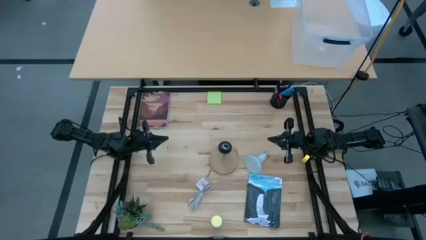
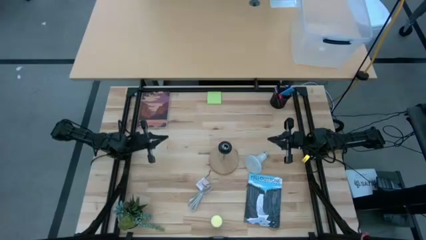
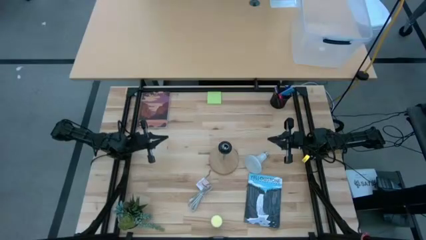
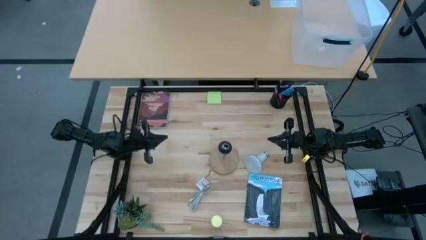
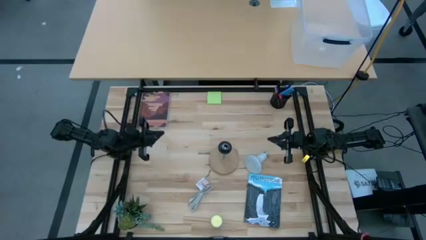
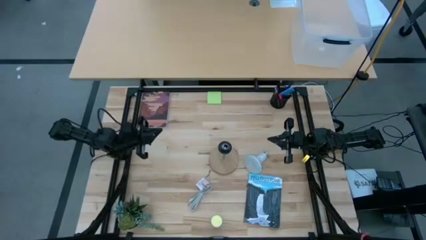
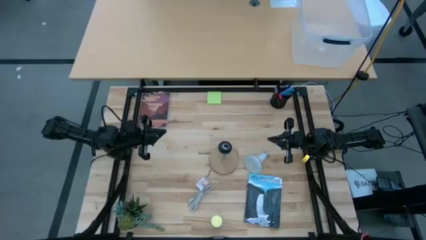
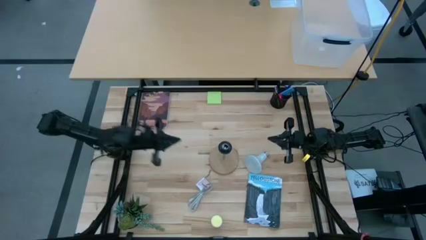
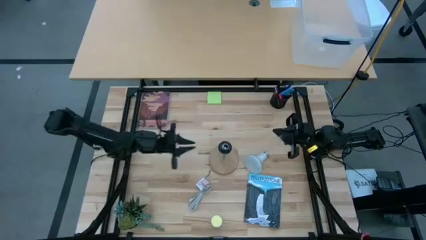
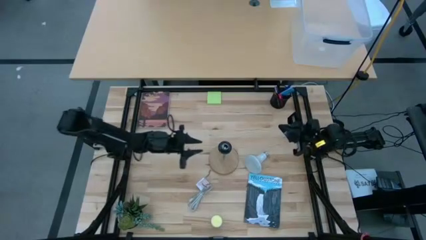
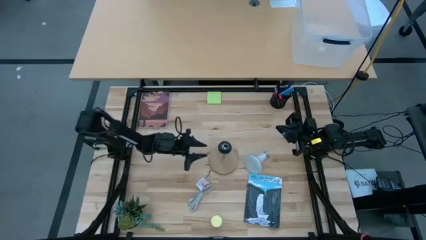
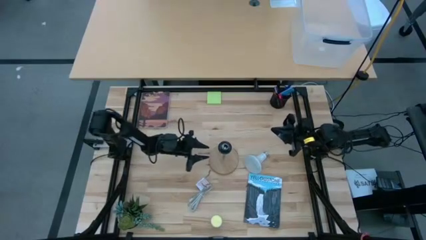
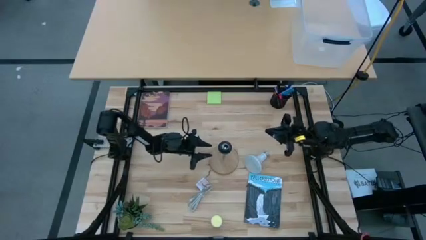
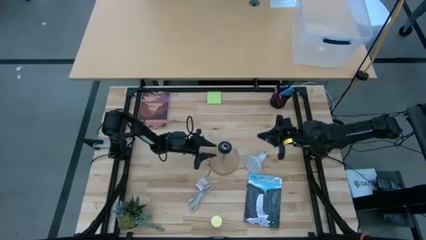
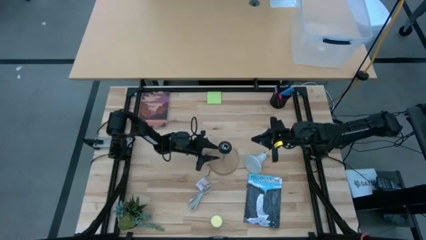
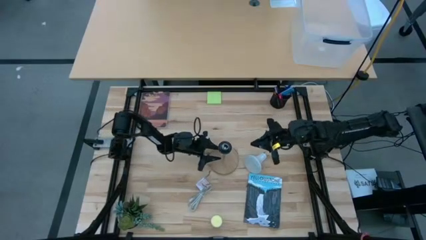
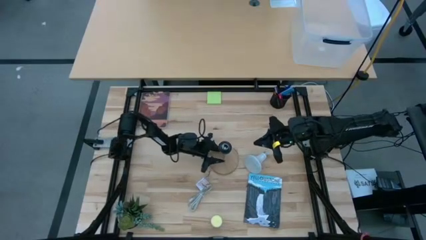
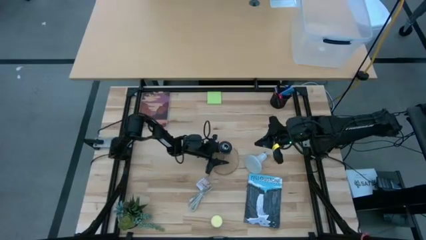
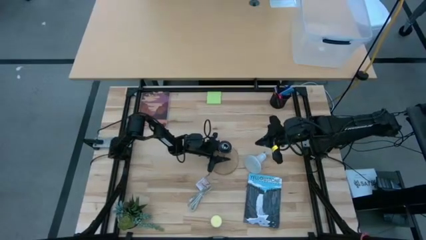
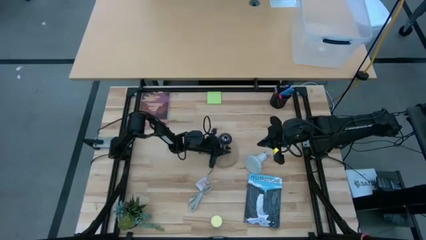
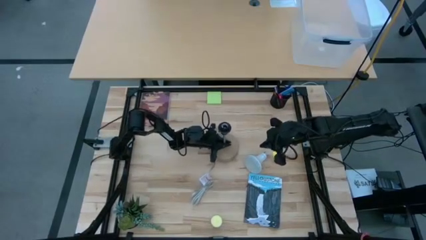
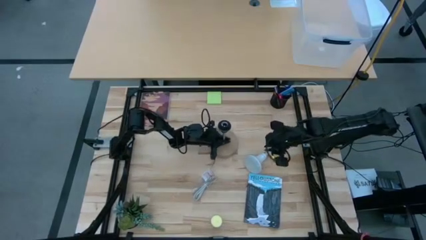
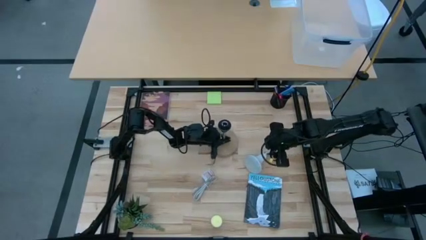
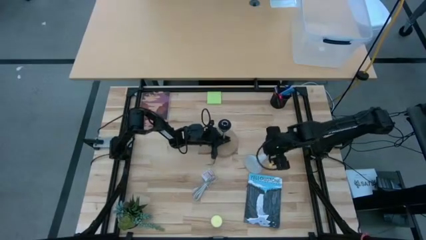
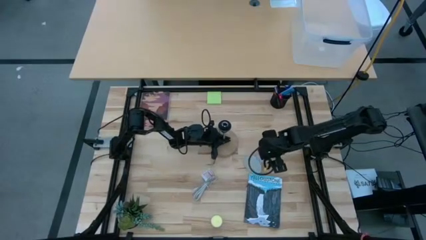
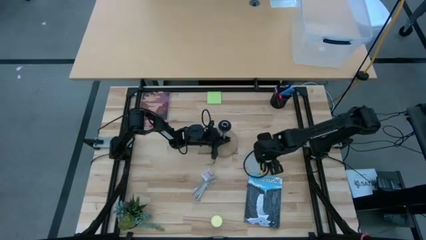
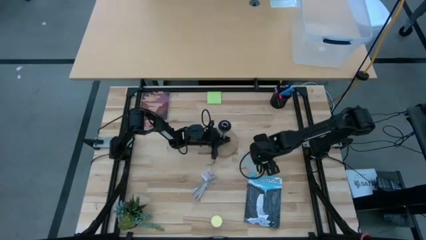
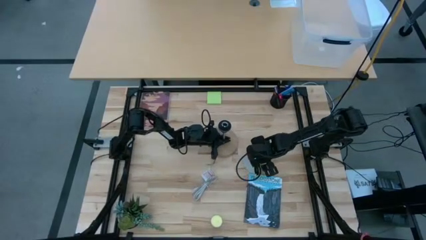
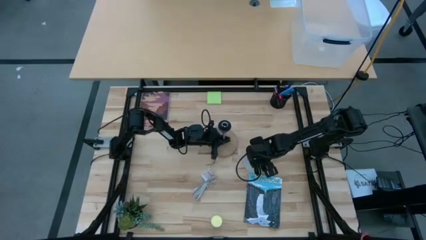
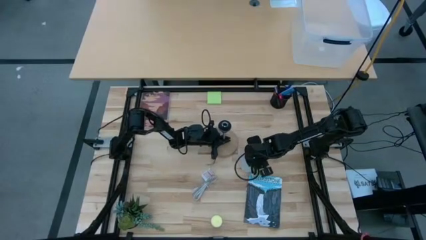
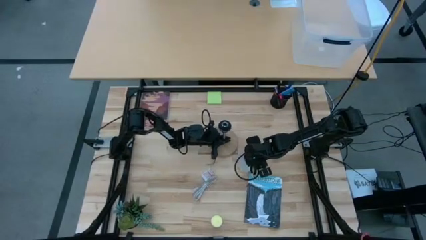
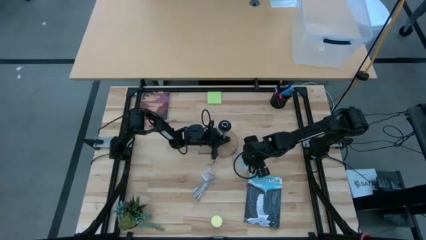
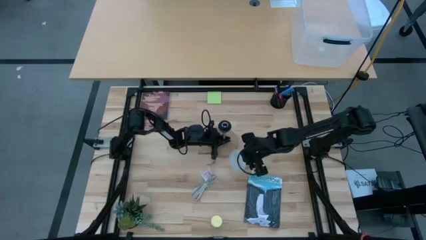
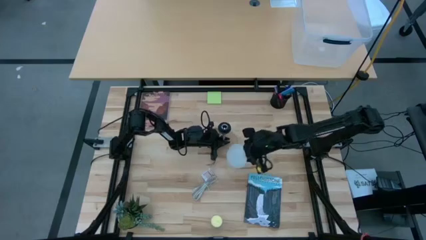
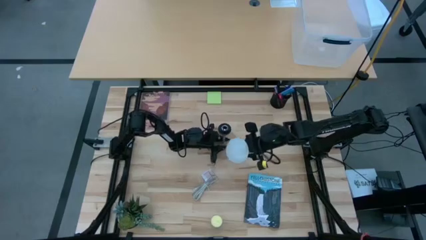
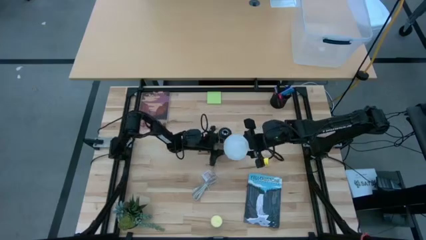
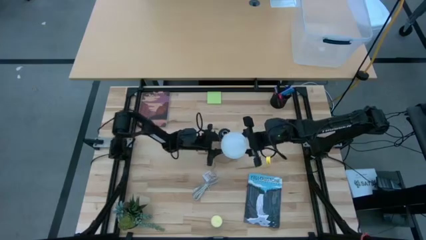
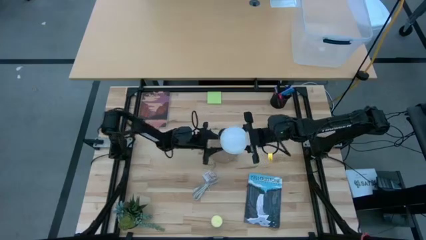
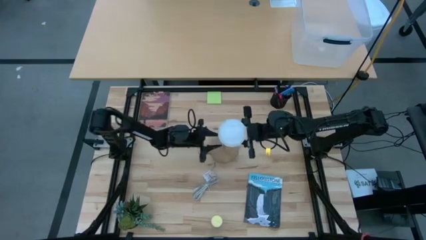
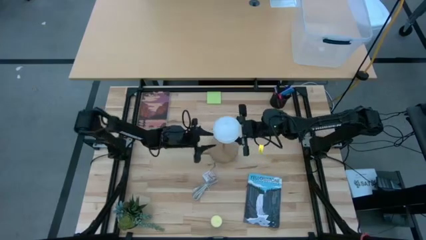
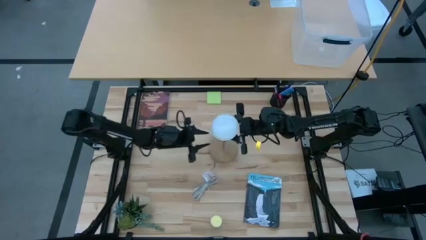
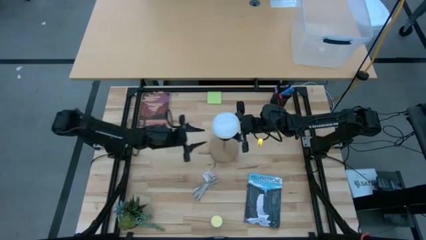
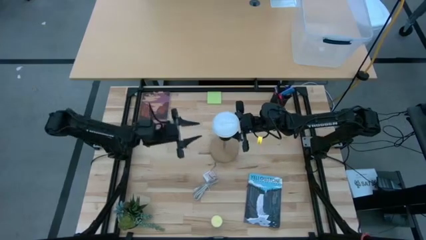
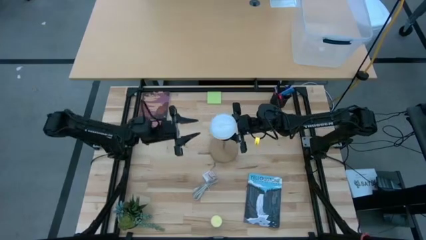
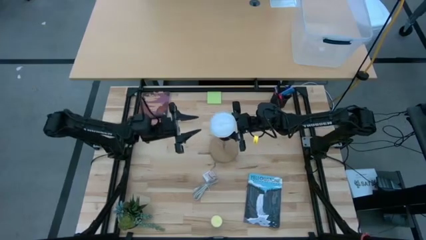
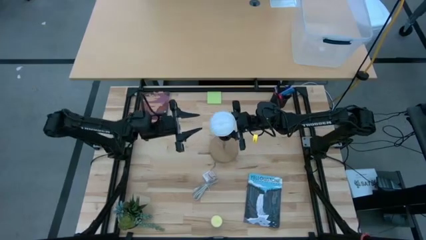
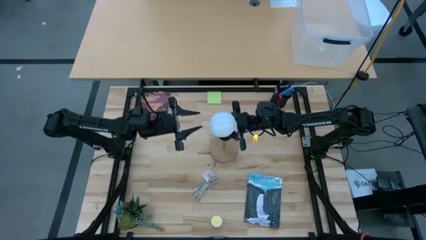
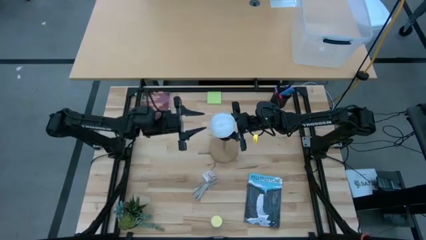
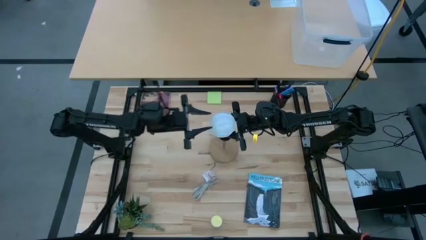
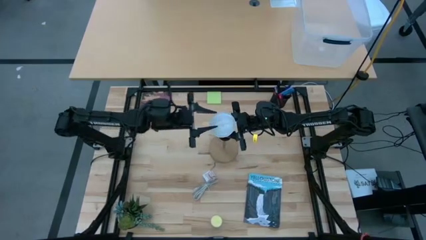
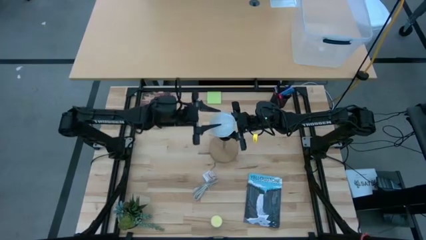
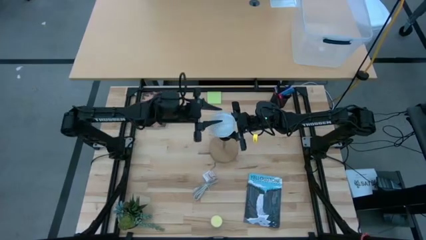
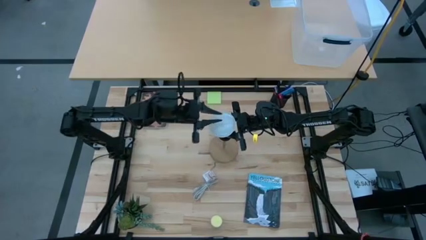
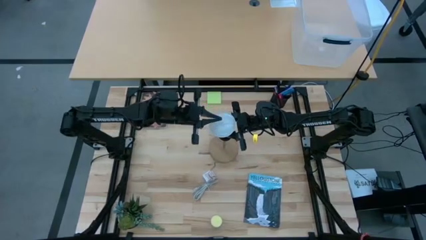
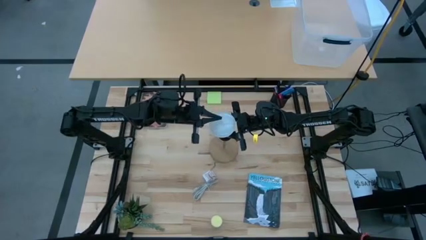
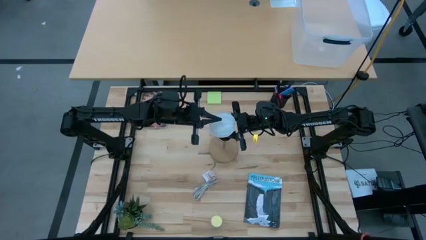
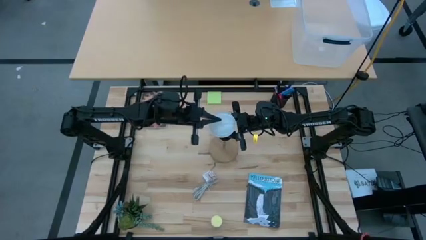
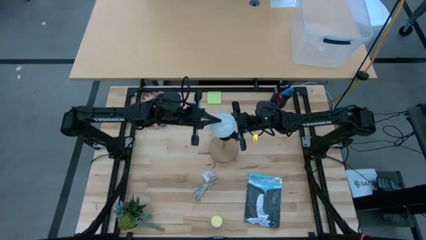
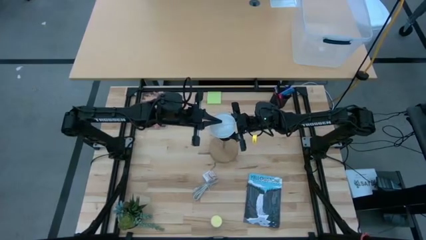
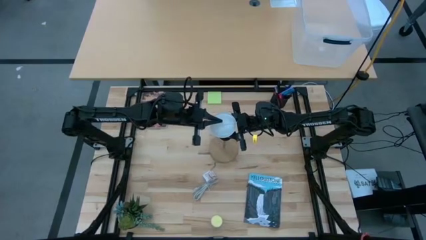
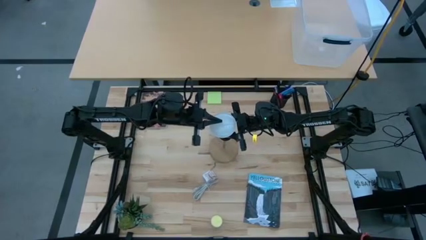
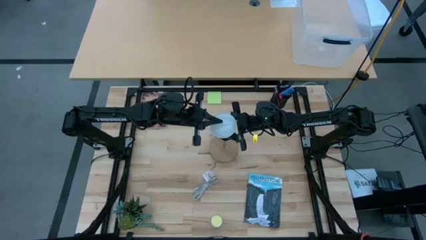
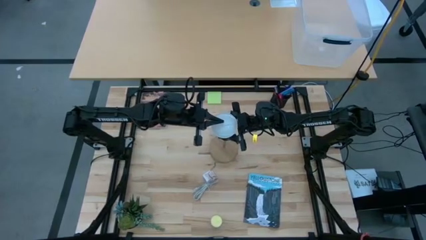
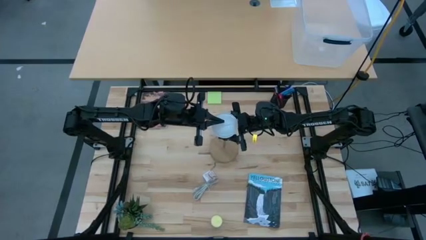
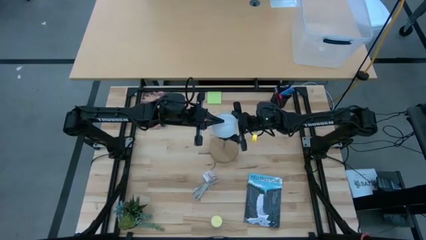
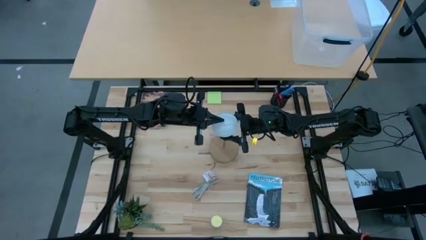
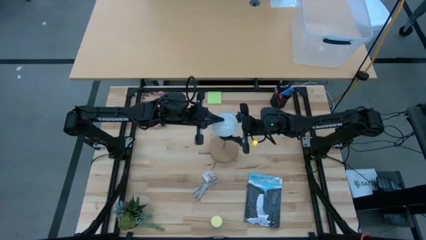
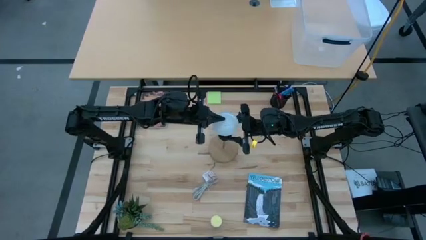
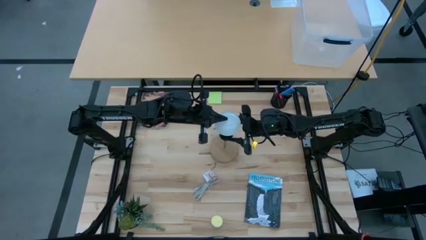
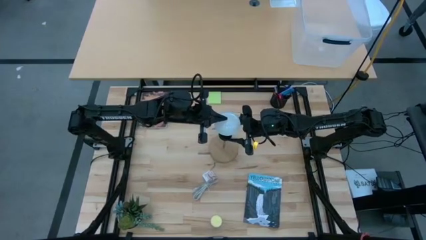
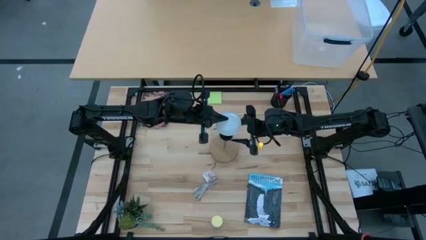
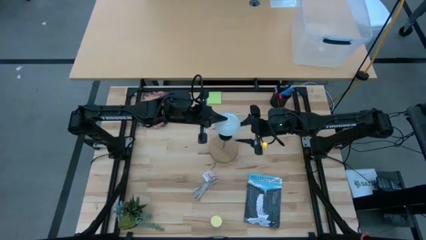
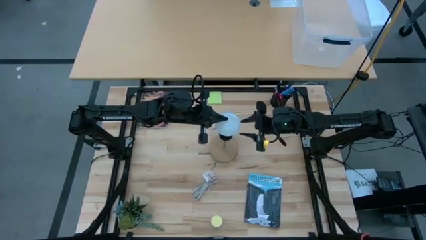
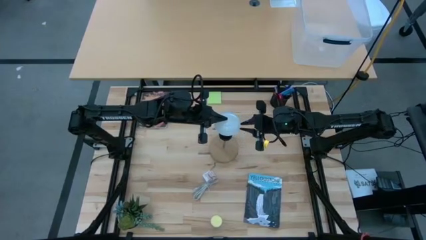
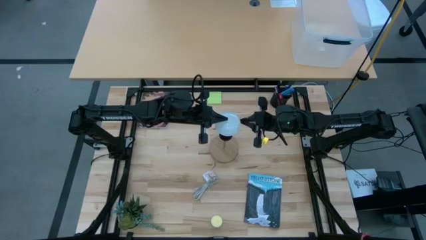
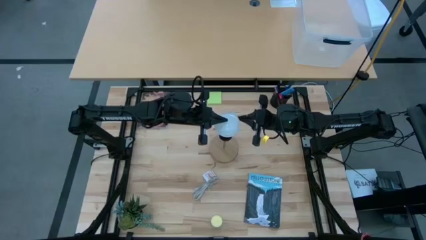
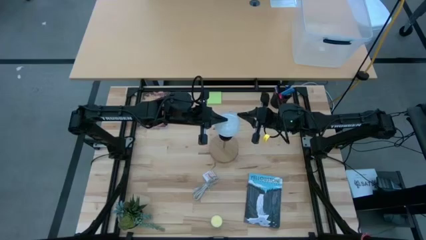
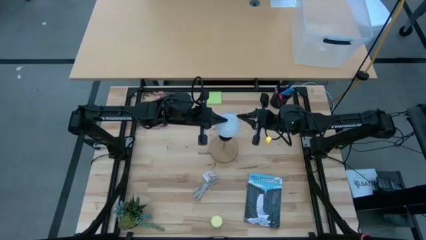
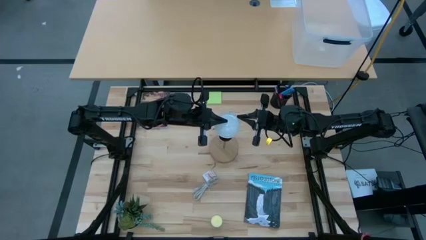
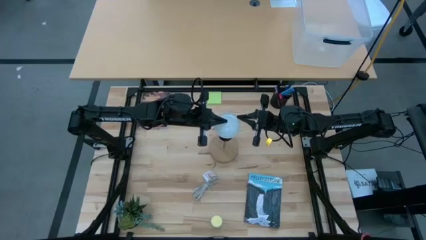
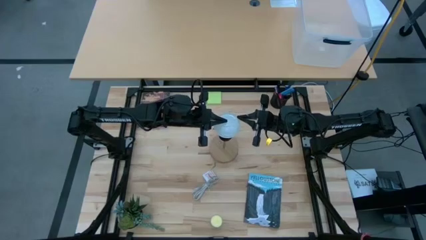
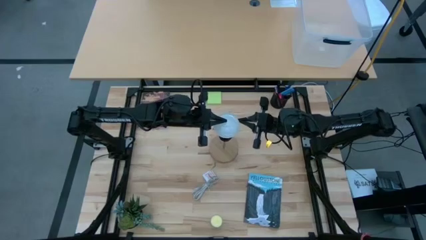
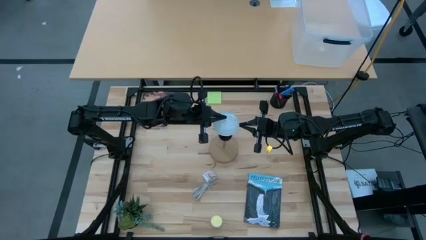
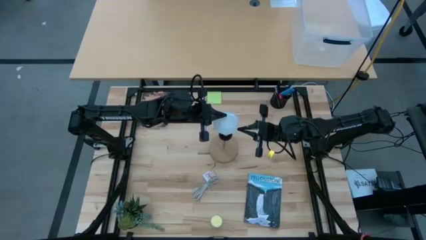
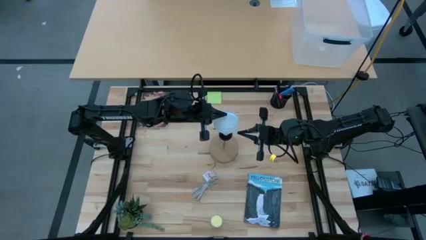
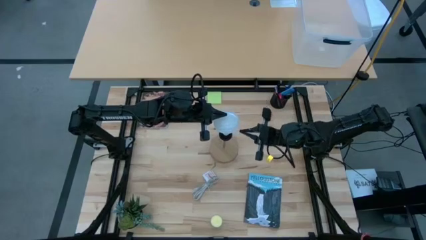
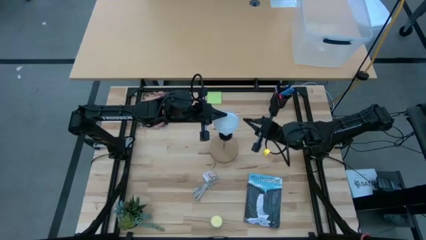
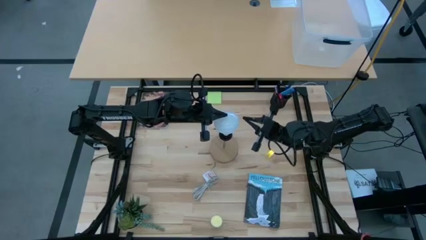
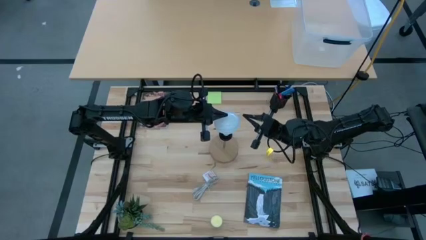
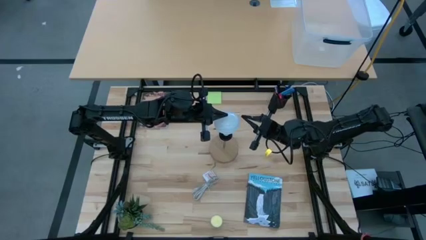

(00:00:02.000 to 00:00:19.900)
Task: Screw lightbulb
Insert the lightbulb into the lamp
